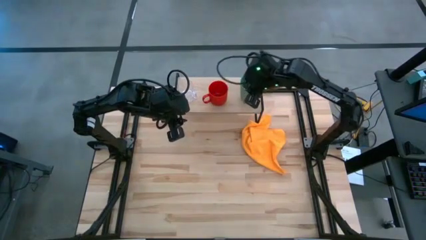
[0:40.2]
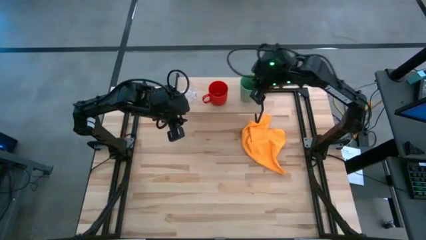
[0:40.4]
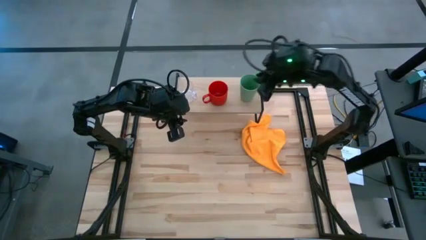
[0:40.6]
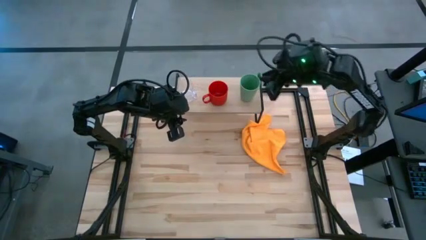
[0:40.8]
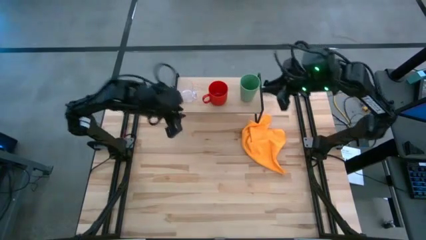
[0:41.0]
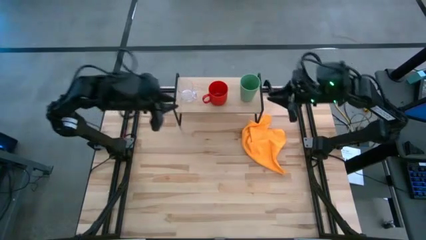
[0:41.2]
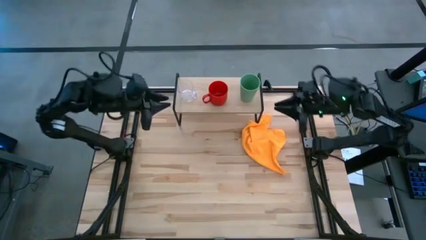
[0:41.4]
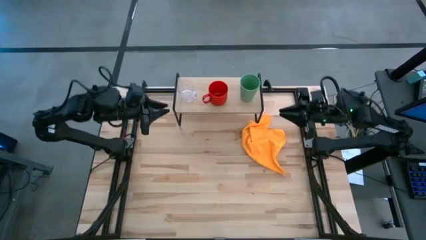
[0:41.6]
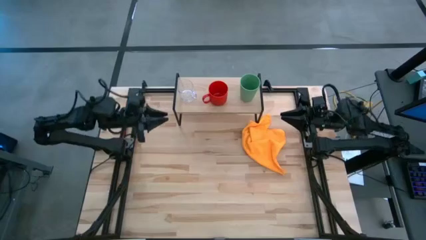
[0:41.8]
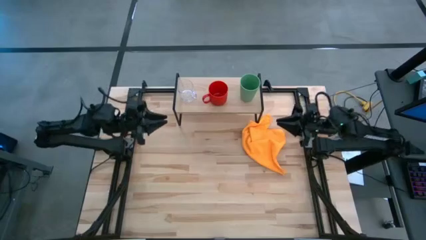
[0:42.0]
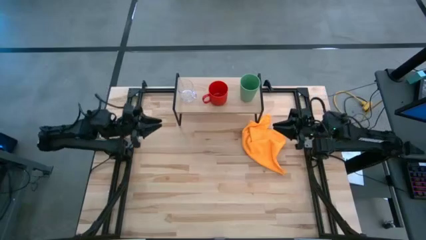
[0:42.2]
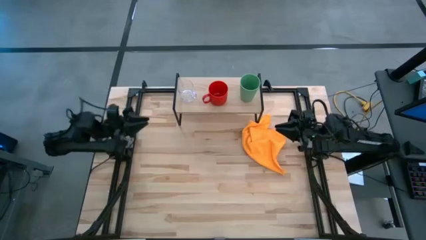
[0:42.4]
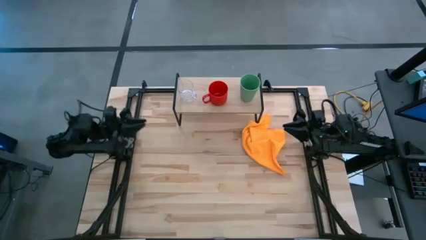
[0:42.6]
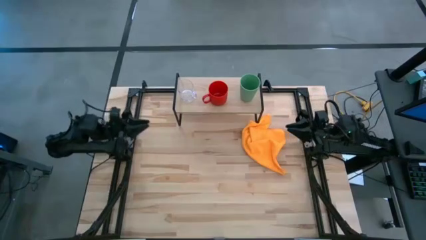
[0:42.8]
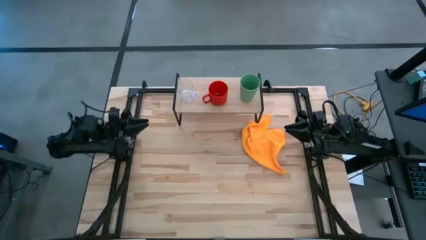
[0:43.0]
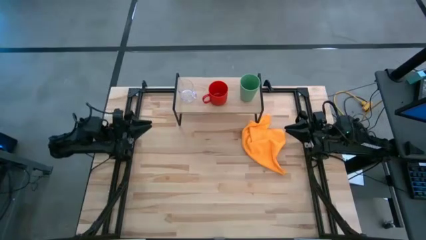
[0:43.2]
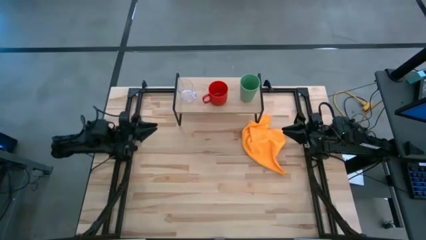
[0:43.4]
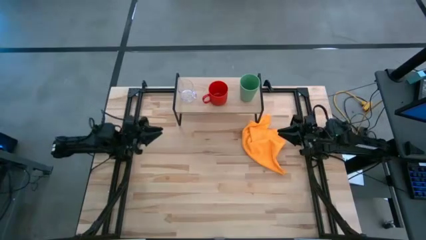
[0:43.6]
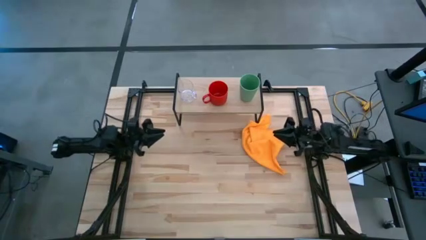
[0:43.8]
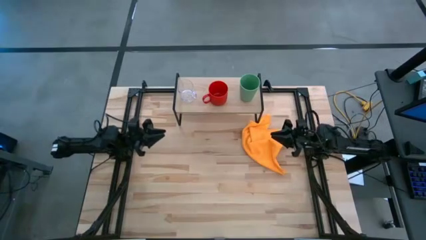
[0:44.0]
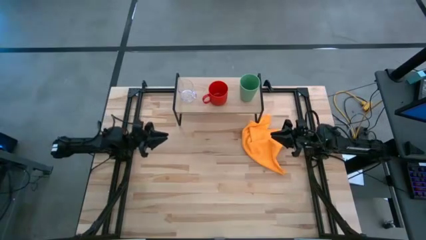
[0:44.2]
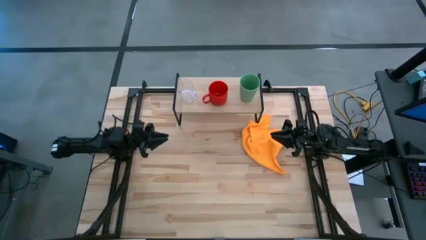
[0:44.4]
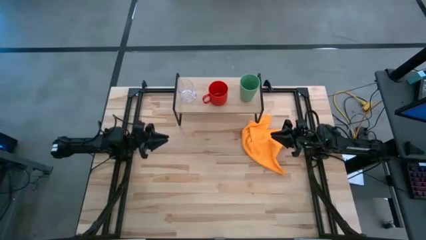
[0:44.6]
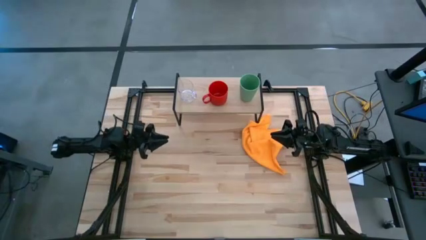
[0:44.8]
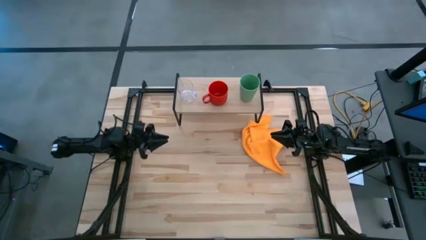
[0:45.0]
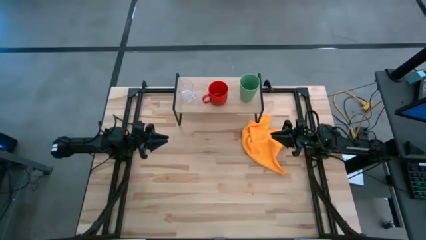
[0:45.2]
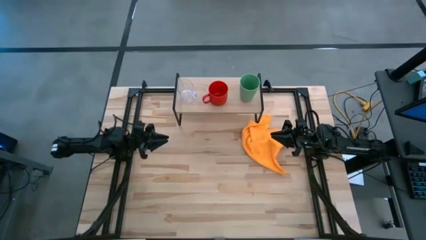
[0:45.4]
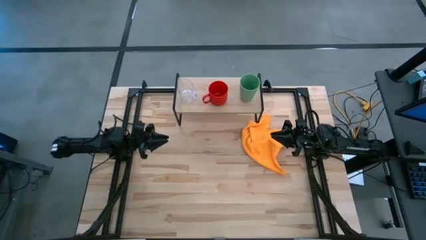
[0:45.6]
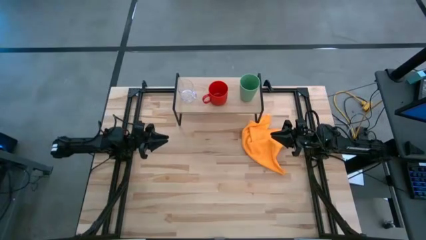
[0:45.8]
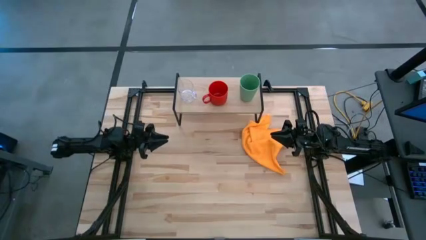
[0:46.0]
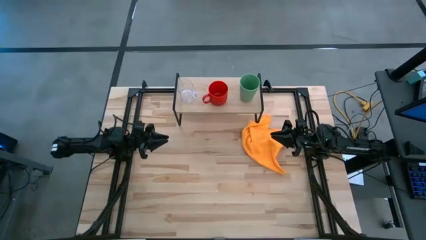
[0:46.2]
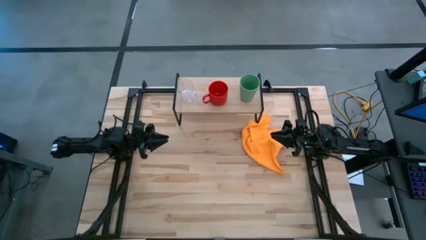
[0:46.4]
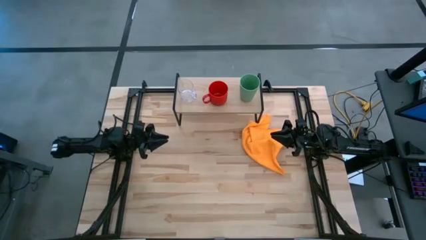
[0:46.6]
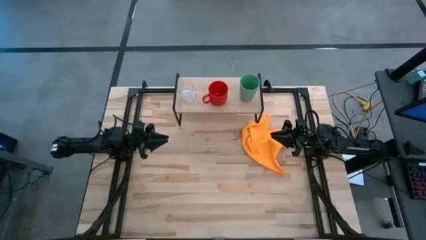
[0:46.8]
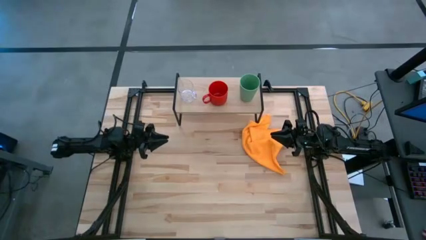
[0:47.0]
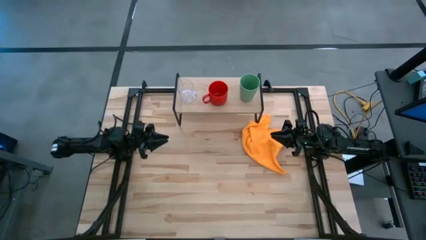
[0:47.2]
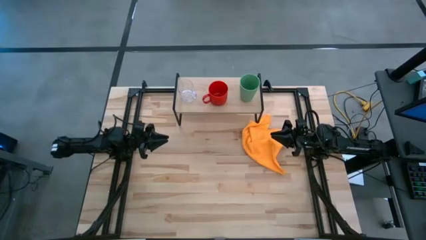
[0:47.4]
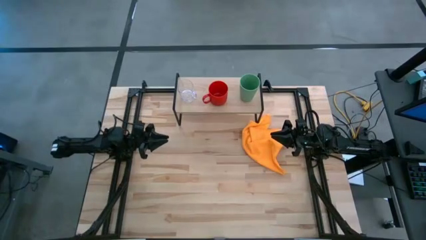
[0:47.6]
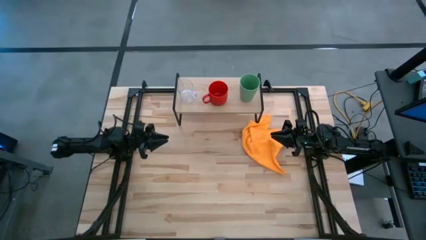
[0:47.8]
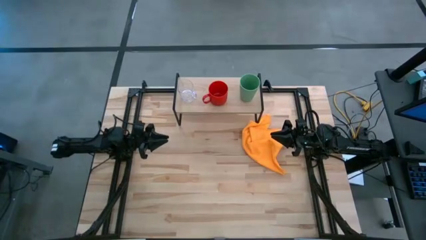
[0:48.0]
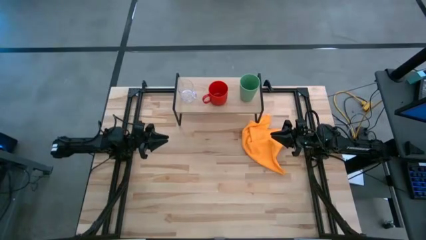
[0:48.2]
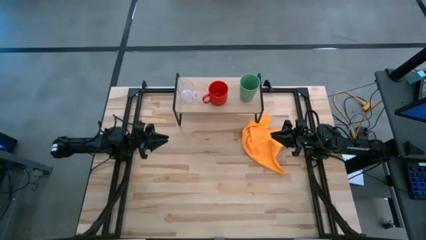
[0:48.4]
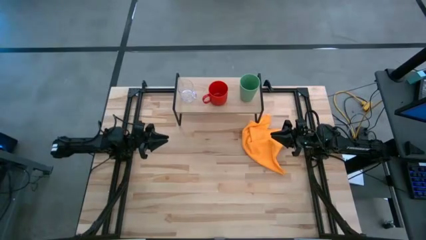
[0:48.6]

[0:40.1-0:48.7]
Task: Stack small to large cups/mugs on shelf
Return to Home Position

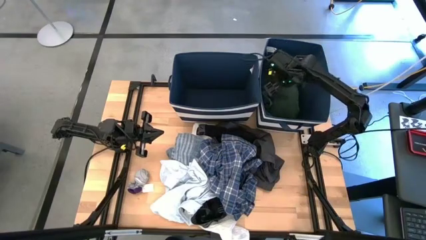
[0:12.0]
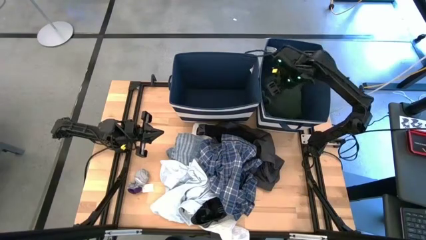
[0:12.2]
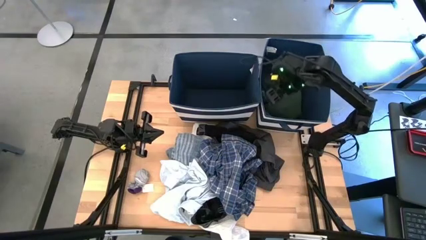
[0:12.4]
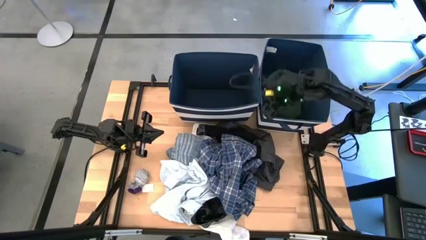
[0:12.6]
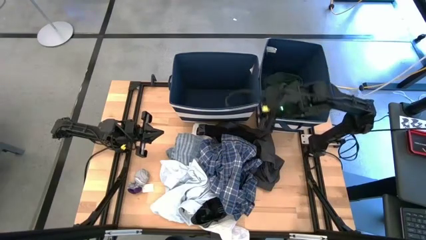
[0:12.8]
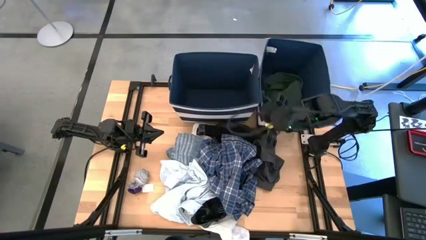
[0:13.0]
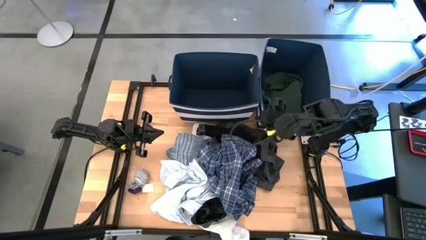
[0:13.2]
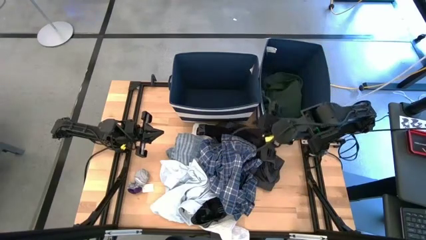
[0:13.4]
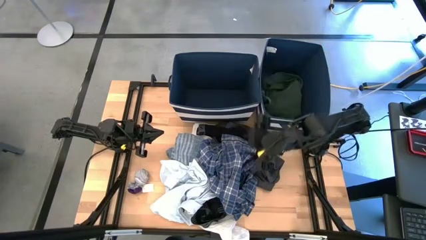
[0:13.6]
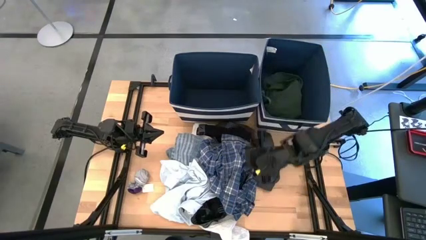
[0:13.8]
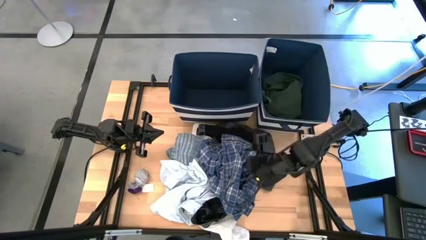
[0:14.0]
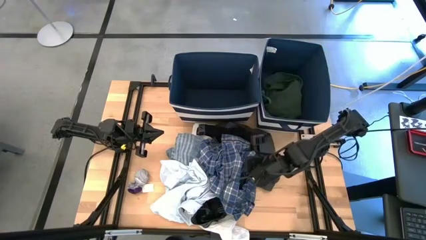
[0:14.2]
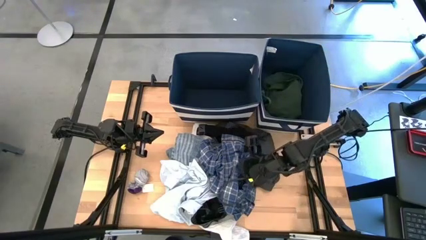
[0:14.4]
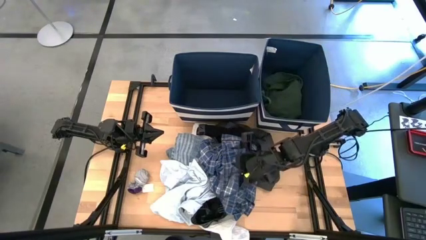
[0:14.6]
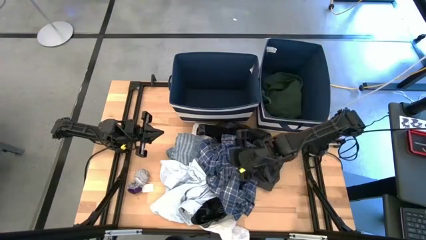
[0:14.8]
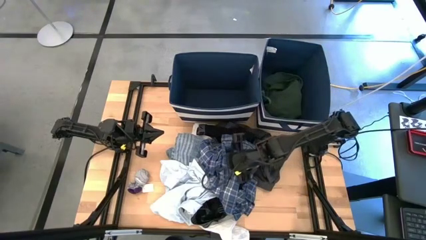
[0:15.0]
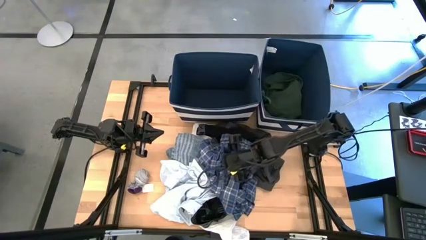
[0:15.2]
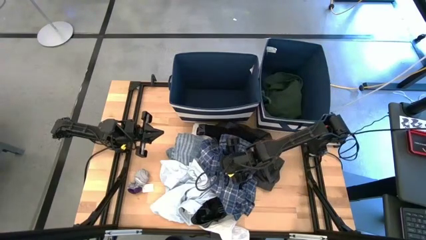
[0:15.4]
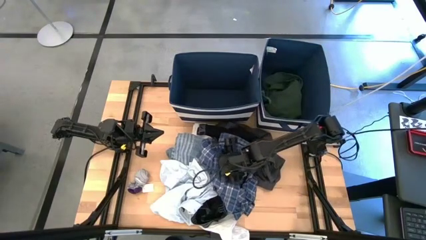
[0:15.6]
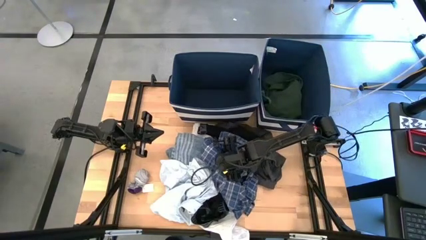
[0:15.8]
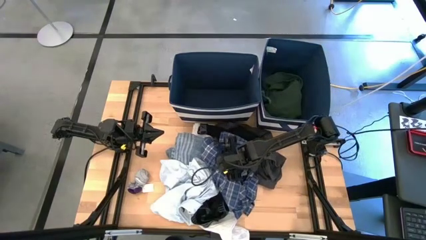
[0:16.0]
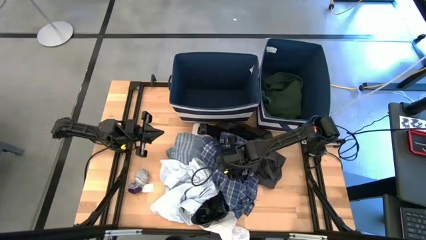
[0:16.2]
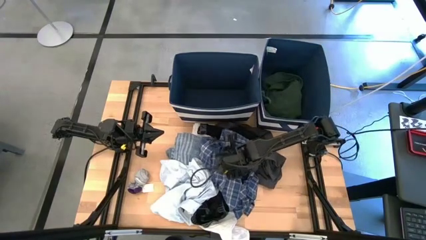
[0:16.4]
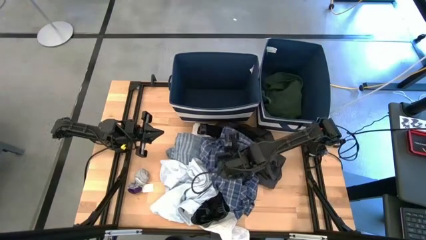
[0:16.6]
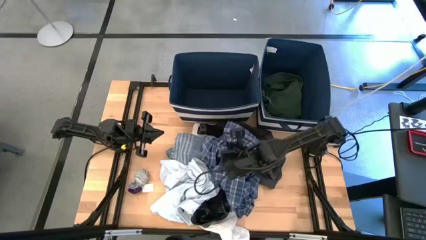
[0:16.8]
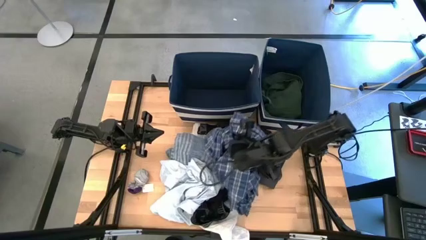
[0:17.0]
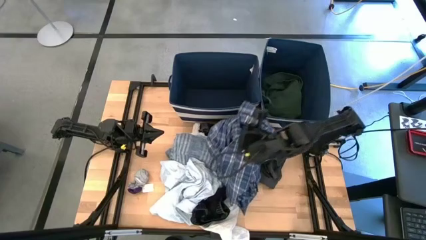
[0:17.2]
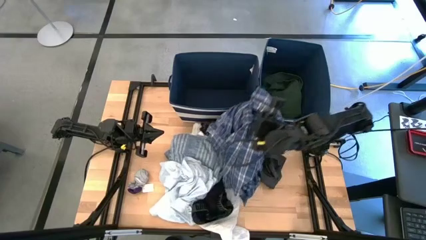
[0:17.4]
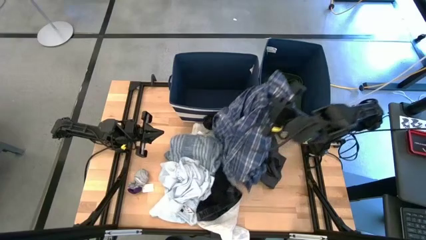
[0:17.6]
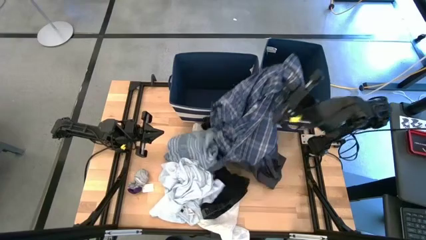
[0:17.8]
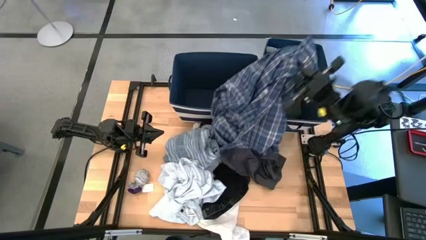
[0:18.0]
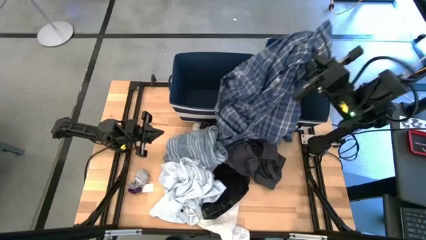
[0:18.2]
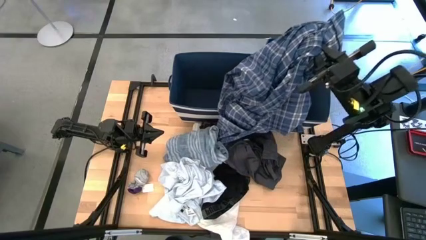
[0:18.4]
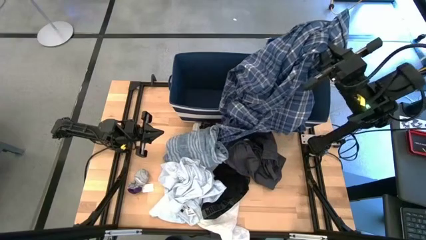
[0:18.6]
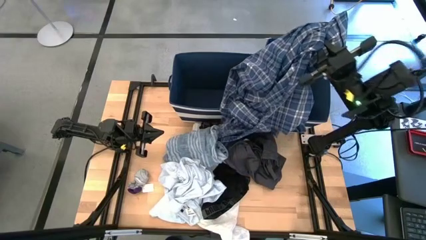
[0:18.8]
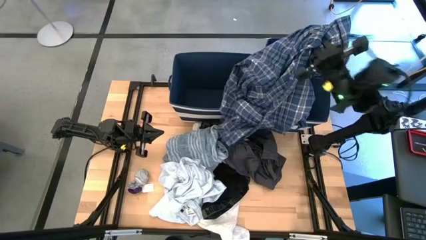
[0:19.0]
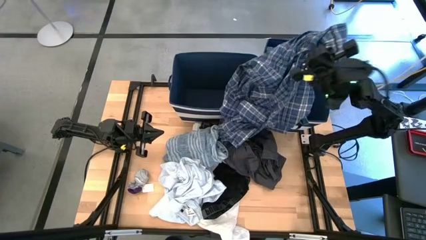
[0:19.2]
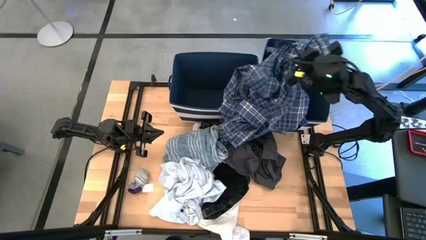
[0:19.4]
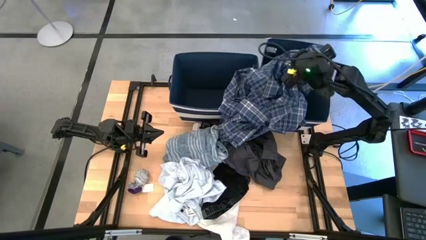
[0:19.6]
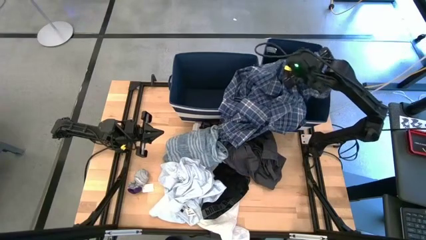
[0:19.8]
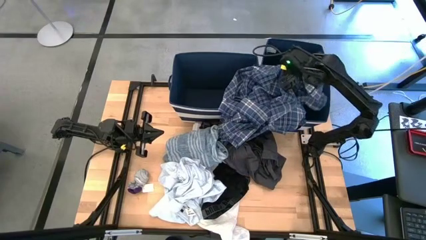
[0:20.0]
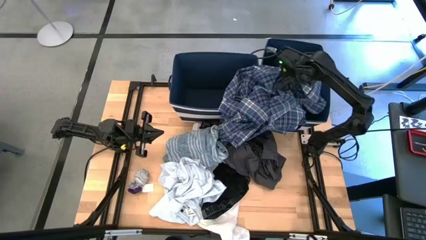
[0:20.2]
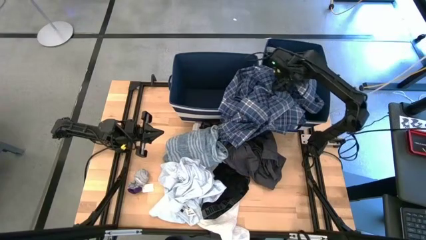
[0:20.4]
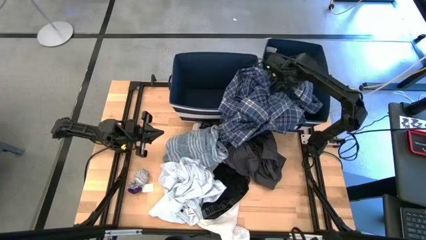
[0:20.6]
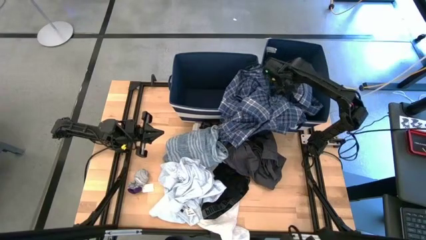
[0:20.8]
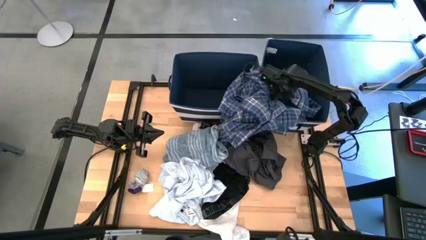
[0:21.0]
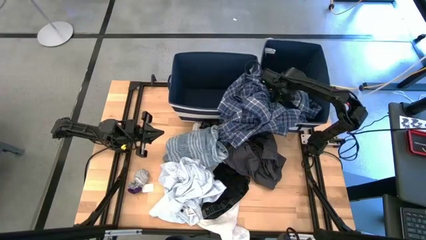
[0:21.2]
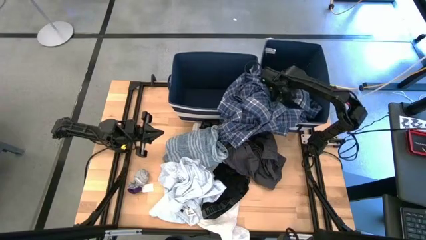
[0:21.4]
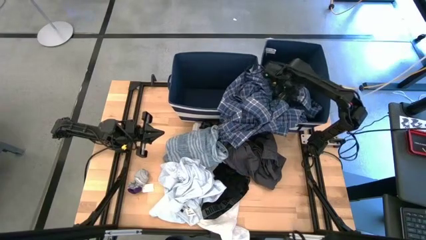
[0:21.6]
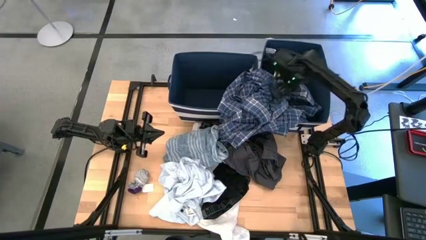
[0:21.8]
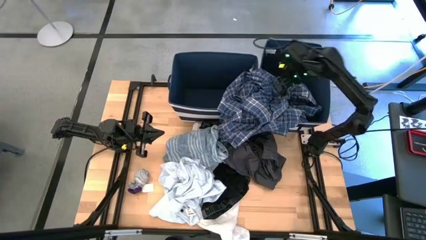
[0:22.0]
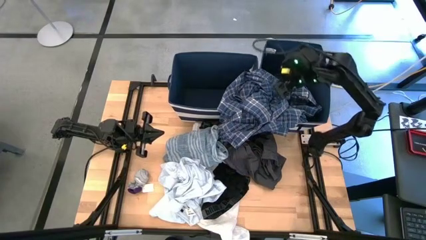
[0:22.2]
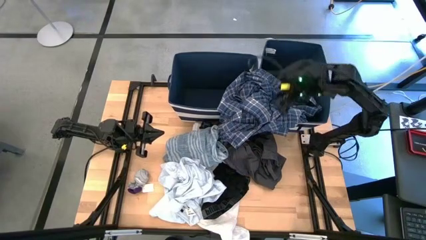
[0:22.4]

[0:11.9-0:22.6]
Task: Sort clothes
Put the blue checkered polo into the right blue laundry organizer
